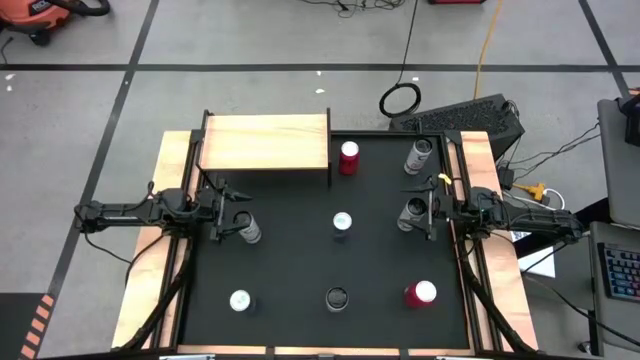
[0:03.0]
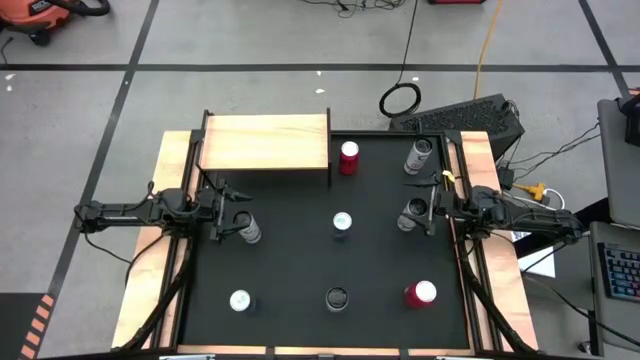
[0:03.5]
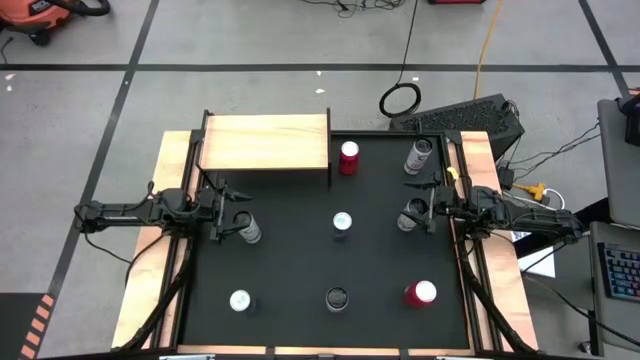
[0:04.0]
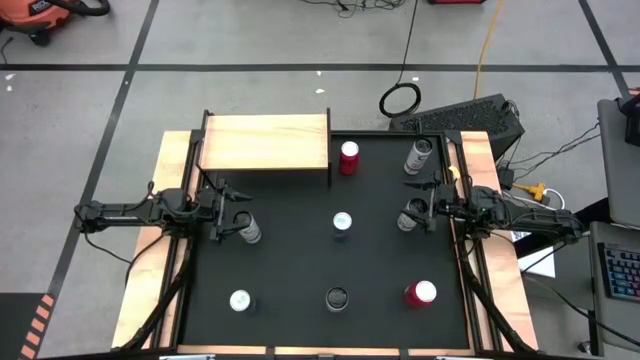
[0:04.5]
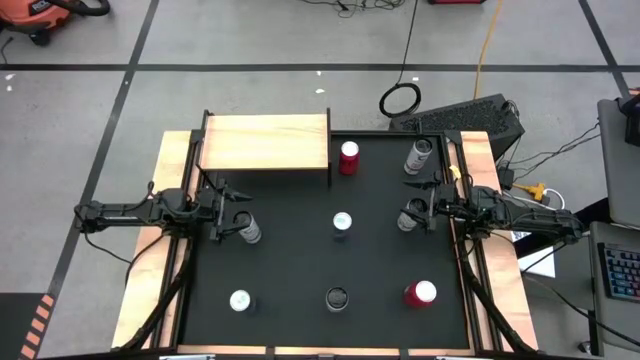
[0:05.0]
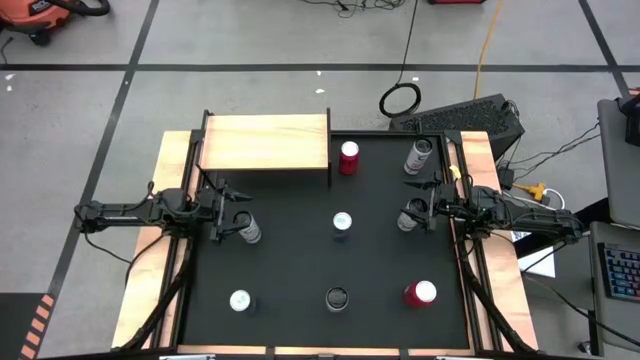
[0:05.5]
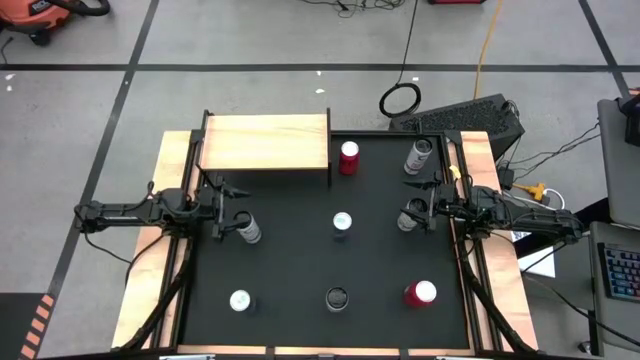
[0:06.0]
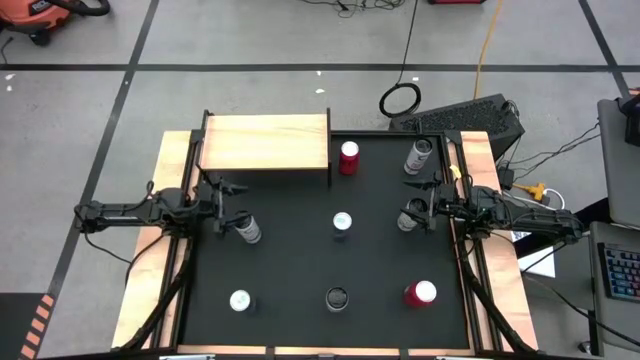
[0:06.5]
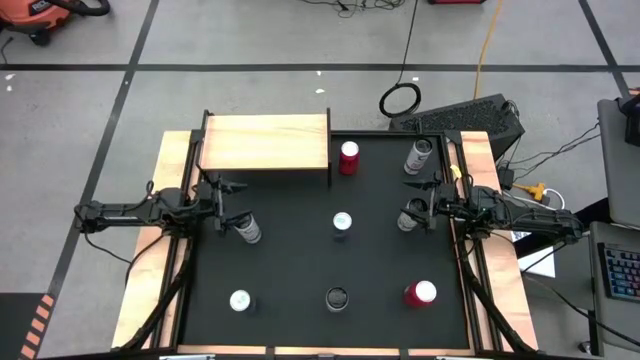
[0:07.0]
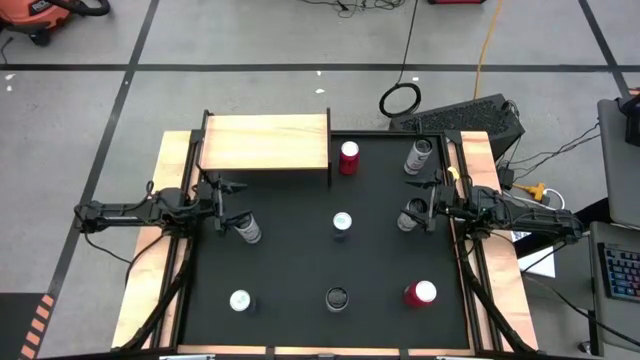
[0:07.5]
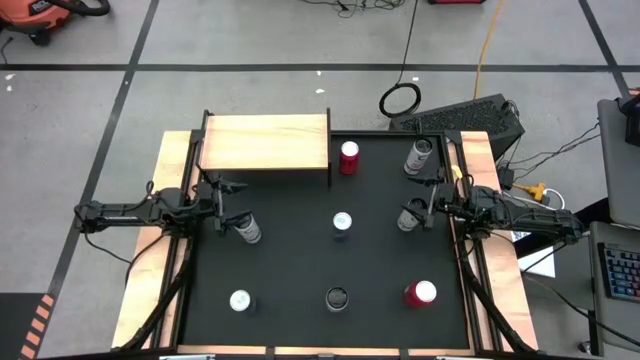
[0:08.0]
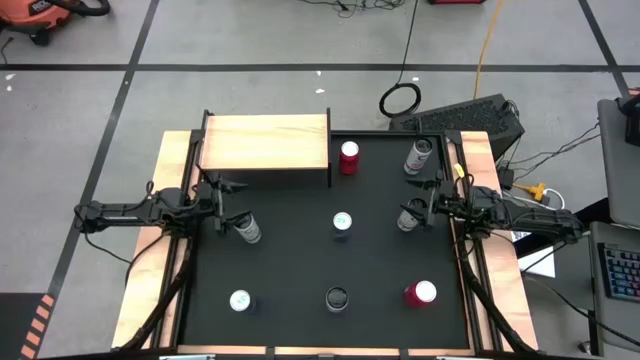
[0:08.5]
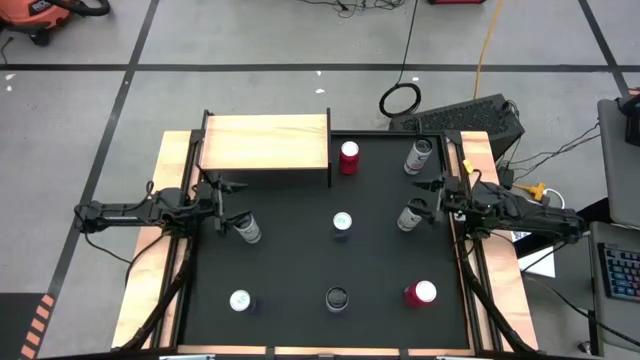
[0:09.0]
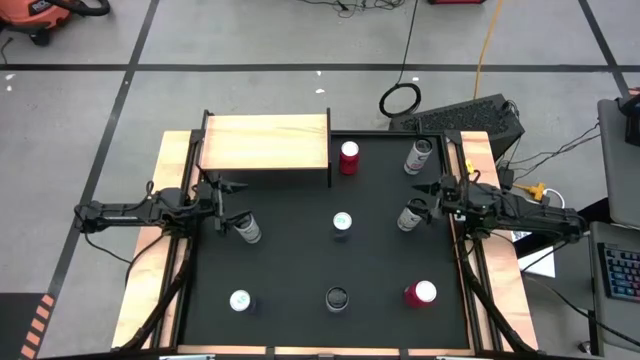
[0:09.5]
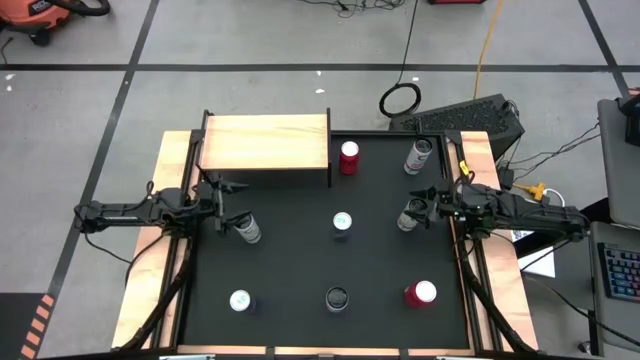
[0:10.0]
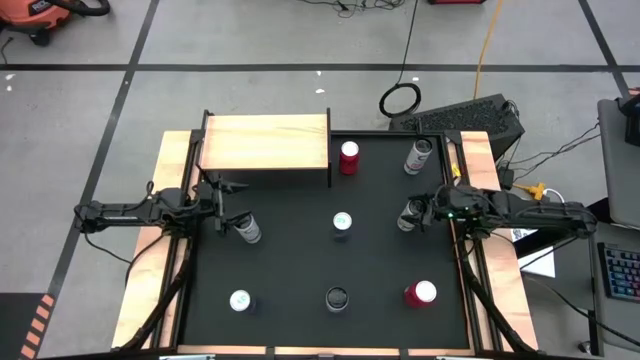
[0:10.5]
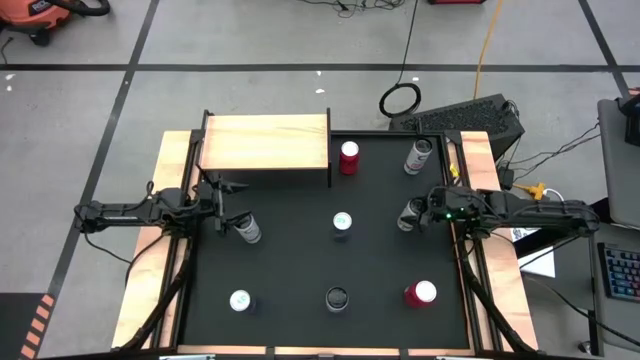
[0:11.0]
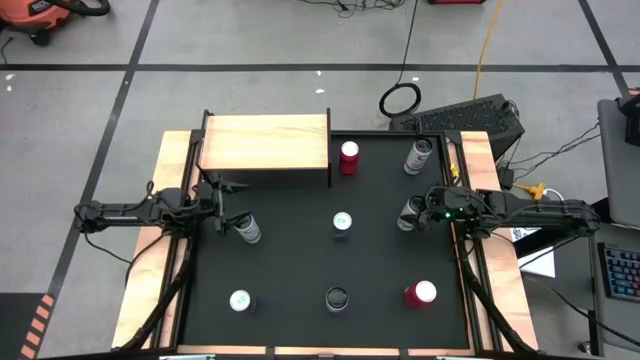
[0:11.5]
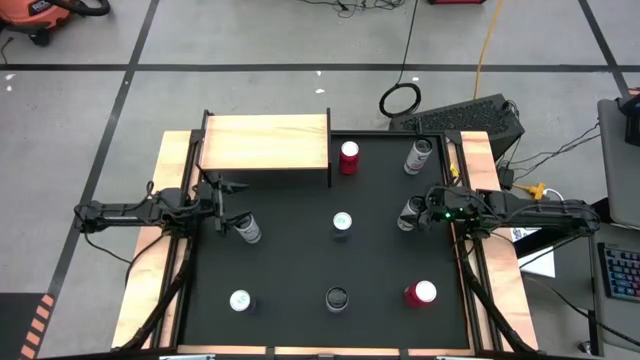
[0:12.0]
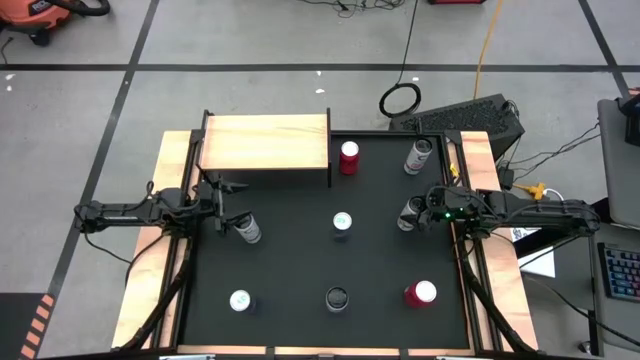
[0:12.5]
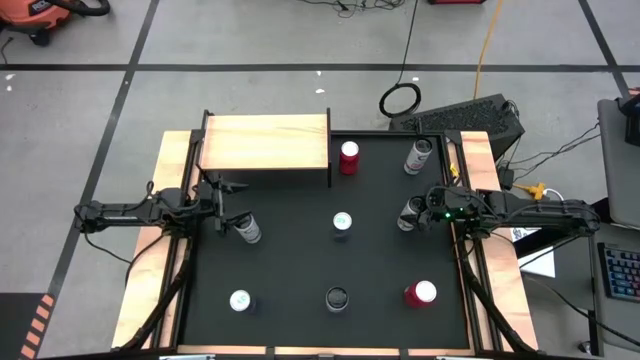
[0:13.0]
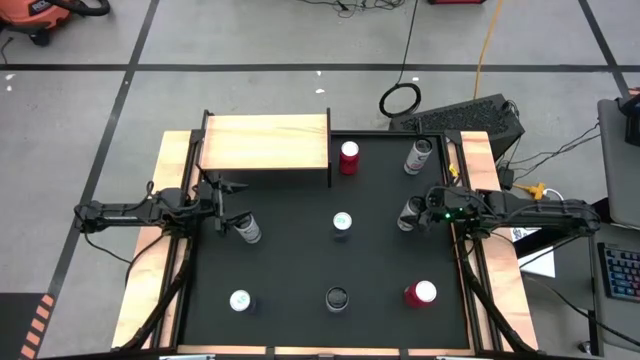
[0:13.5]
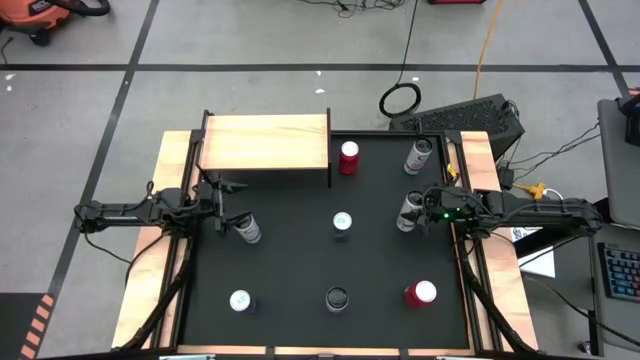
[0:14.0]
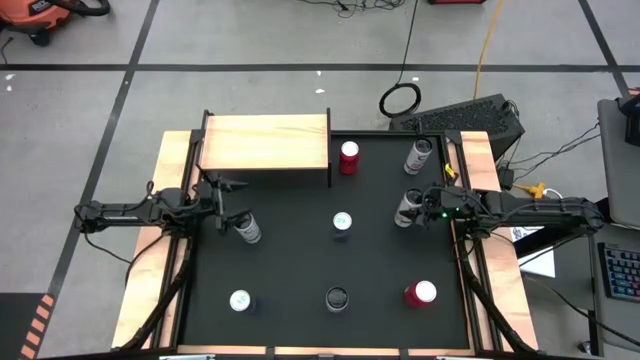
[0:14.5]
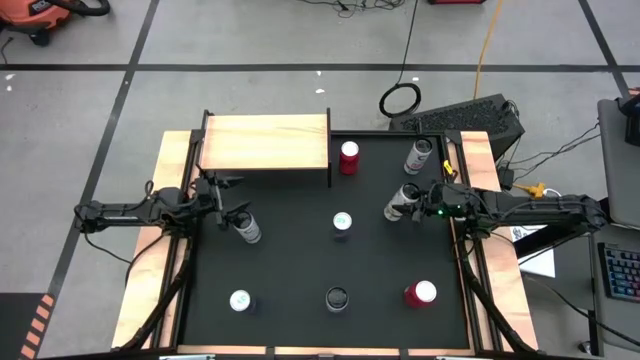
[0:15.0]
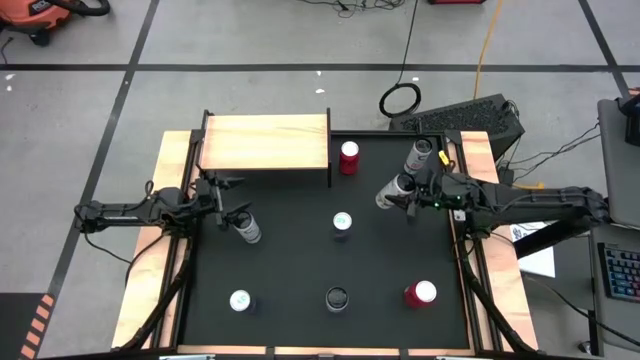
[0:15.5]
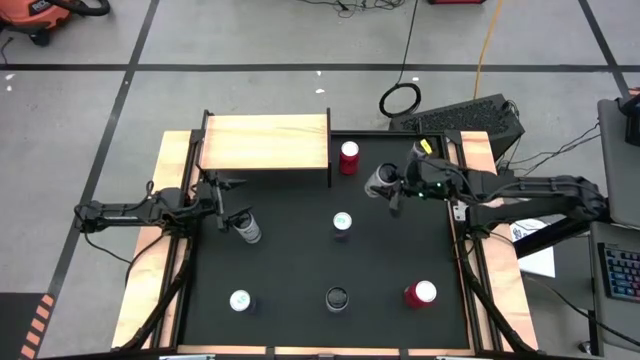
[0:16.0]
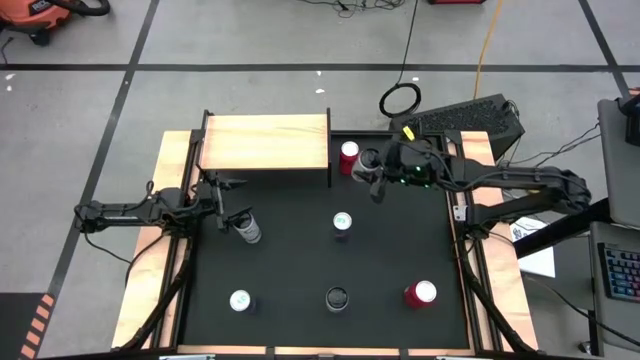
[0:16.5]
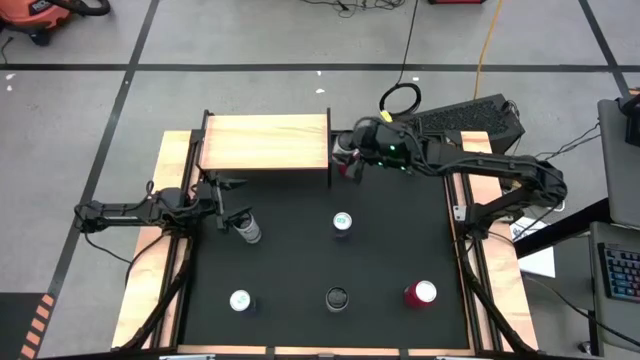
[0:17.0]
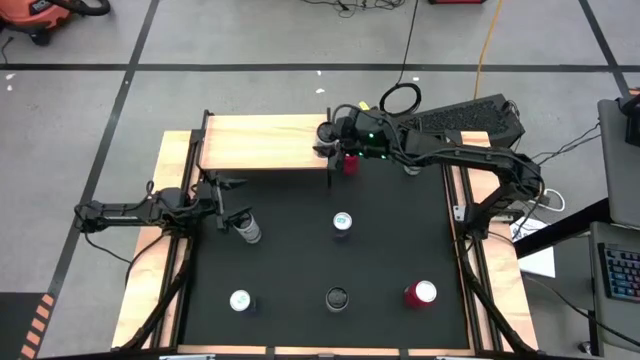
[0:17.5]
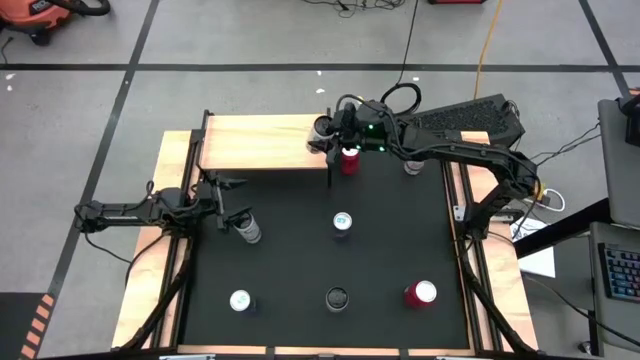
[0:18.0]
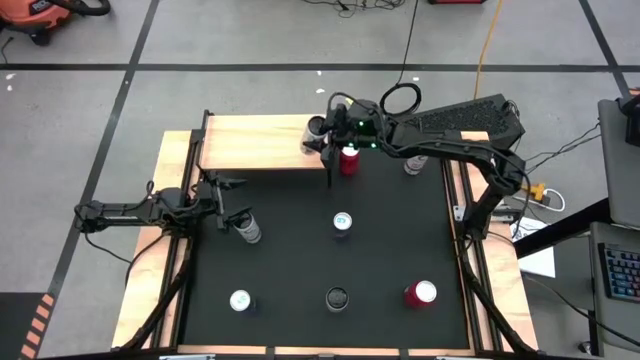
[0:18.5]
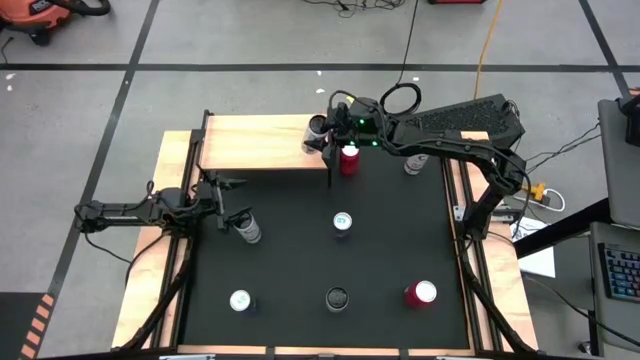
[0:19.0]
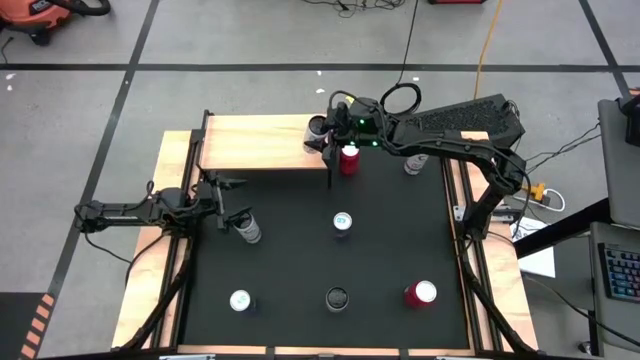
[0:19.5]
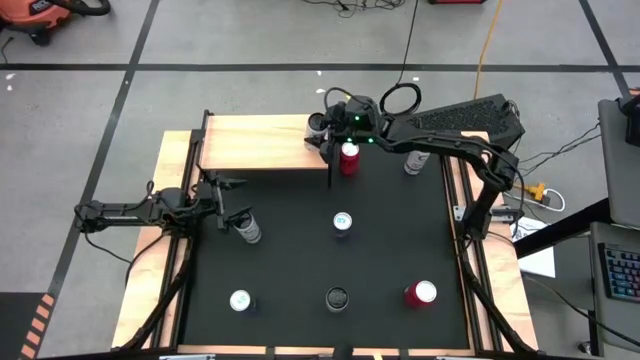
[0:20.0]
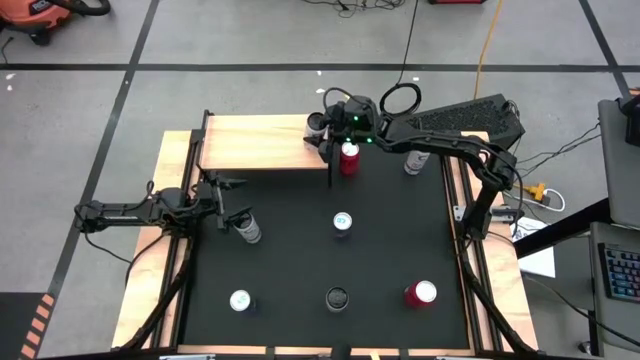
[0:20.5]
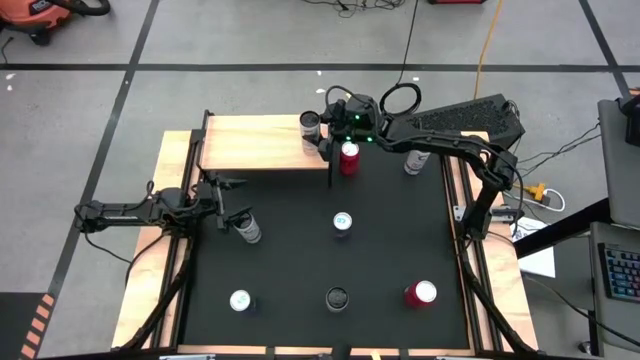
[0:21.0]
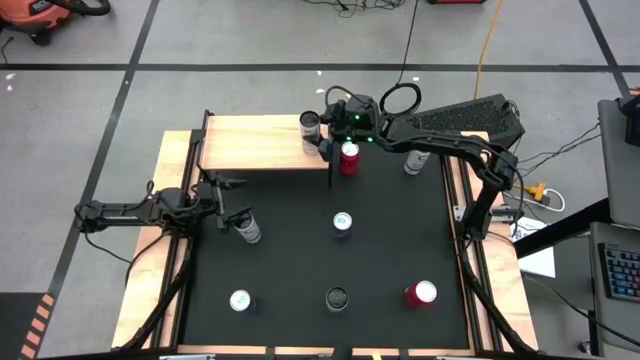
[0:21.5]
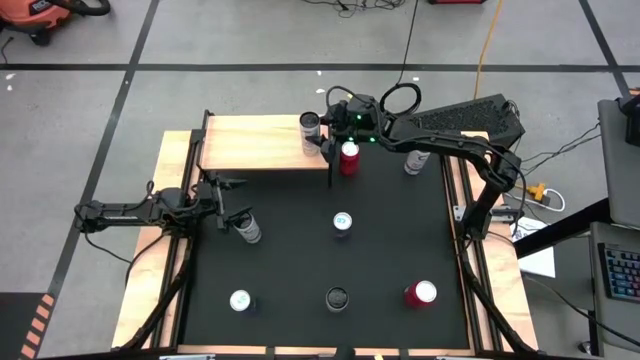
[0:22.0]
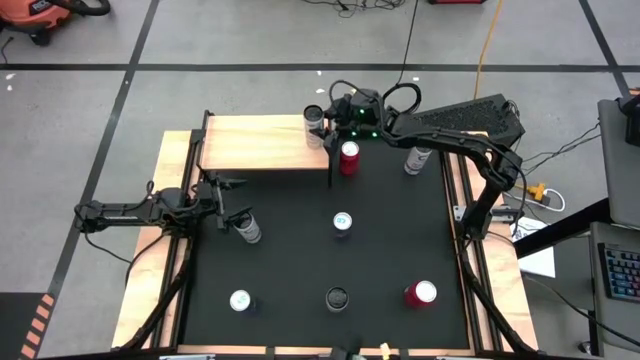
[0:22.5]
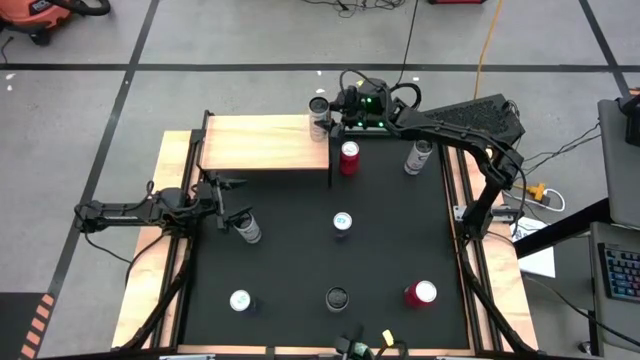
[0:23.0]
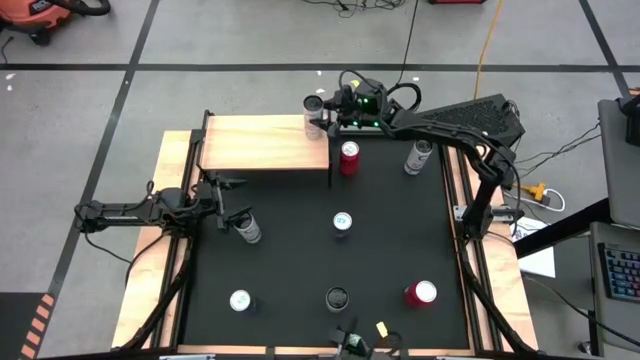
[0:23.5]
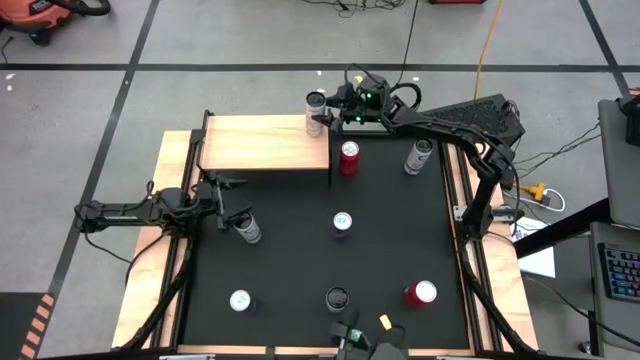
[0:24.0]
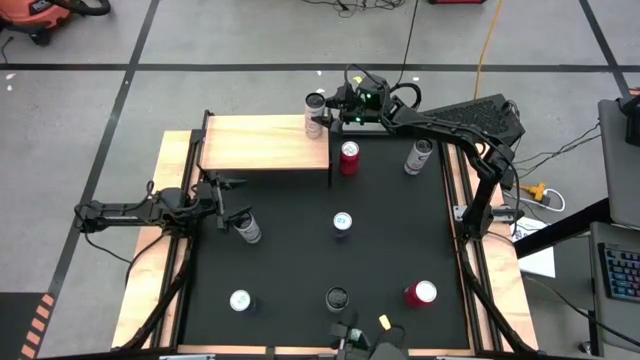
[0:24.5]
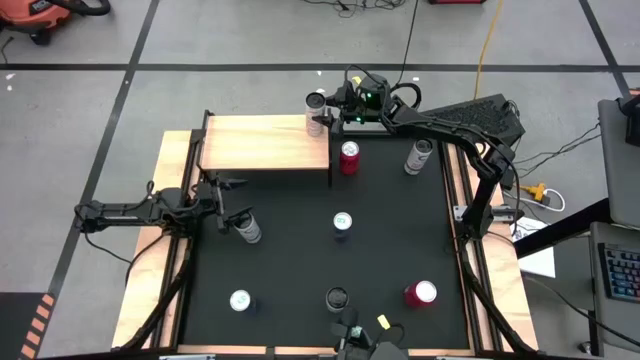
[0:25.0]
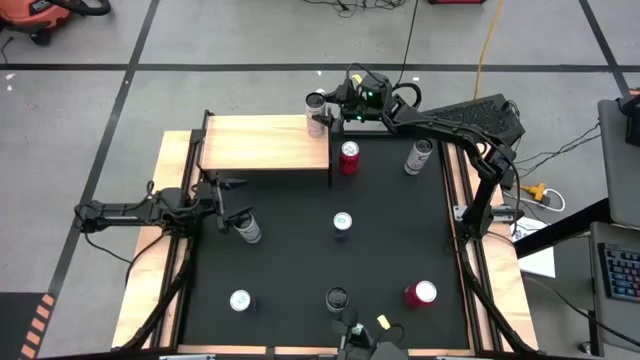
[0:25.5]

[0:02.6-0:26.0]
Task: Place canned beverage on shelf
Put the white yellow soda can on the shelf
